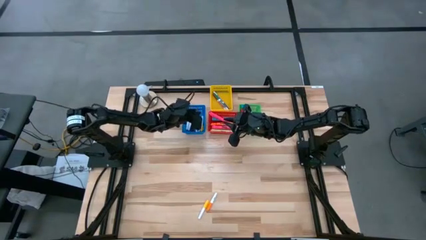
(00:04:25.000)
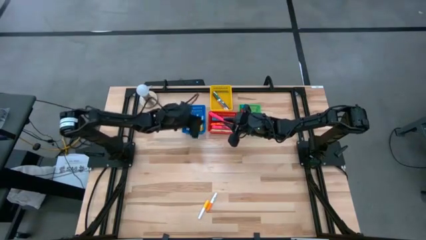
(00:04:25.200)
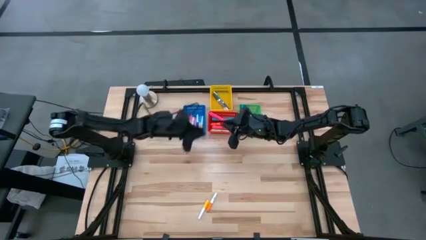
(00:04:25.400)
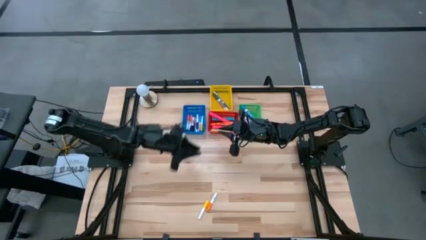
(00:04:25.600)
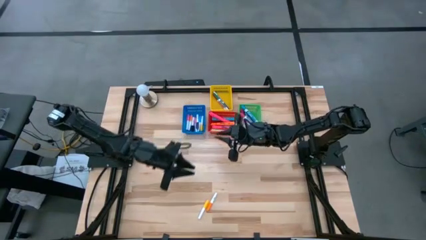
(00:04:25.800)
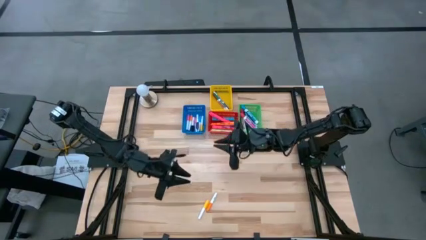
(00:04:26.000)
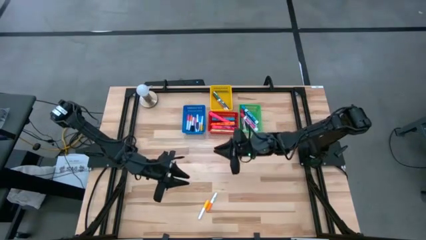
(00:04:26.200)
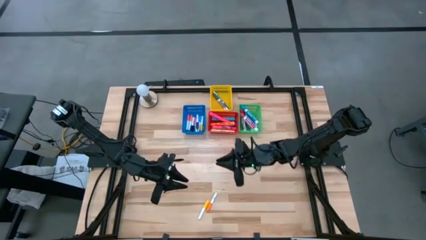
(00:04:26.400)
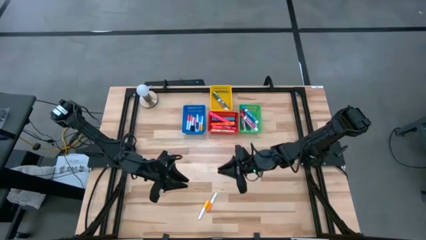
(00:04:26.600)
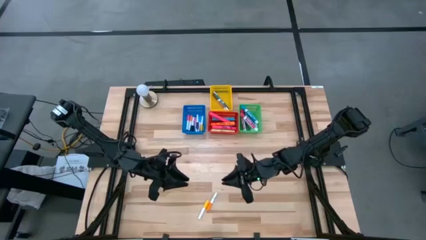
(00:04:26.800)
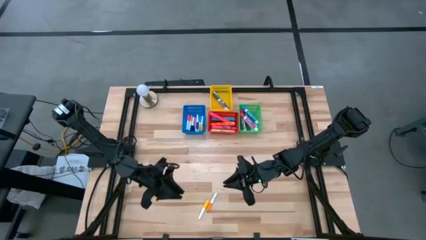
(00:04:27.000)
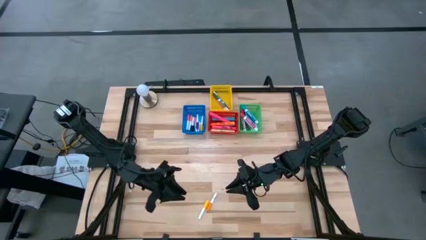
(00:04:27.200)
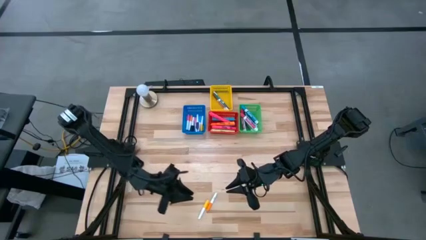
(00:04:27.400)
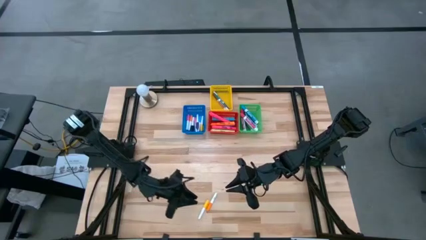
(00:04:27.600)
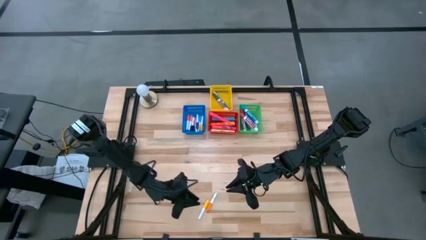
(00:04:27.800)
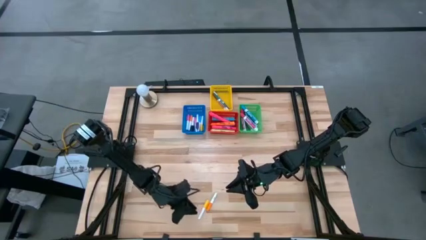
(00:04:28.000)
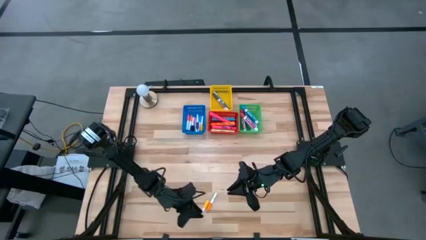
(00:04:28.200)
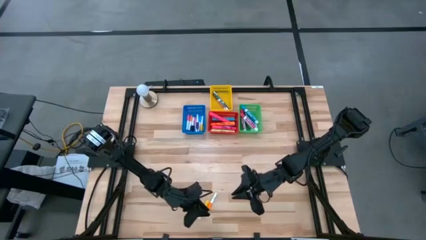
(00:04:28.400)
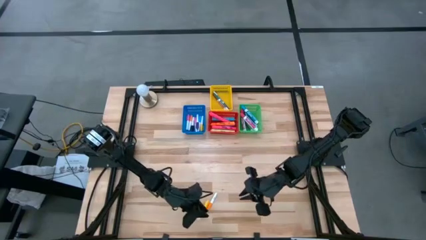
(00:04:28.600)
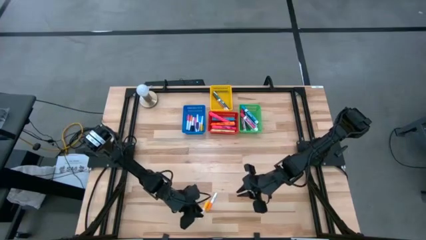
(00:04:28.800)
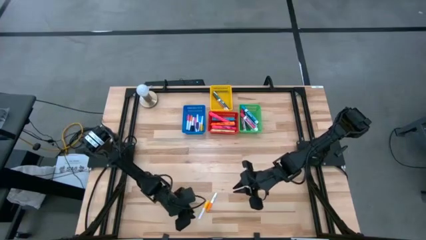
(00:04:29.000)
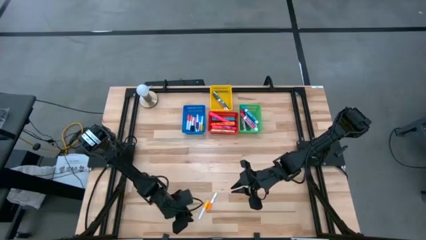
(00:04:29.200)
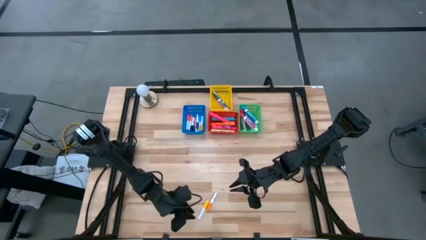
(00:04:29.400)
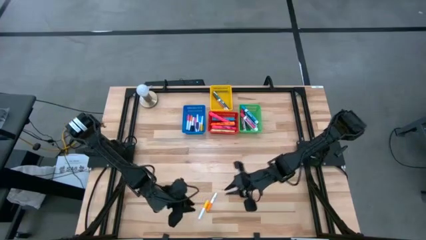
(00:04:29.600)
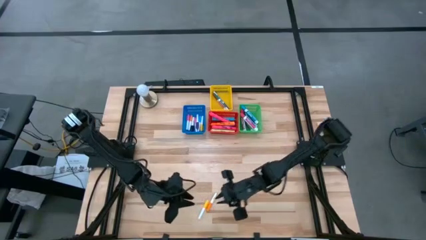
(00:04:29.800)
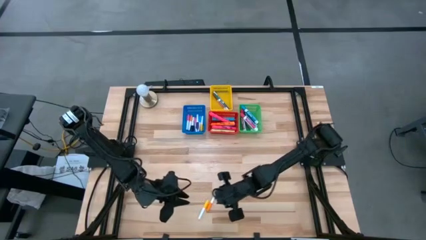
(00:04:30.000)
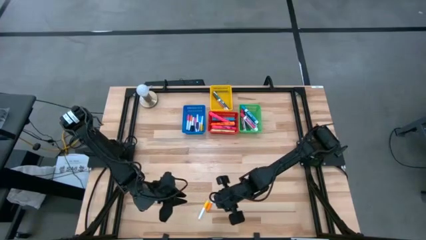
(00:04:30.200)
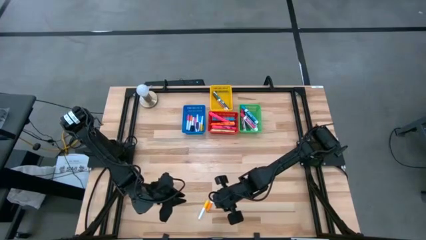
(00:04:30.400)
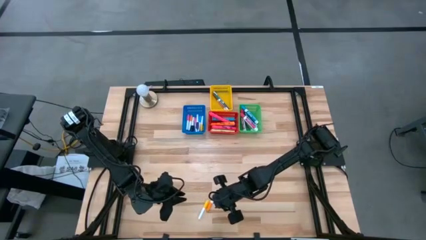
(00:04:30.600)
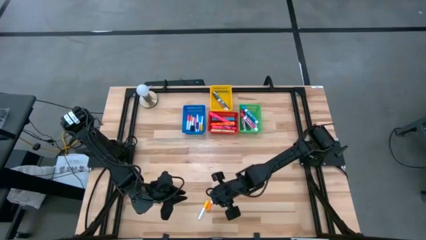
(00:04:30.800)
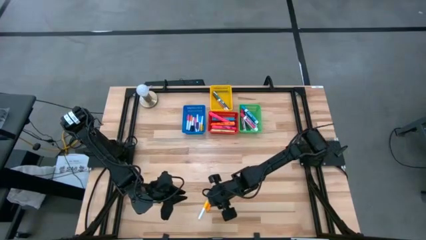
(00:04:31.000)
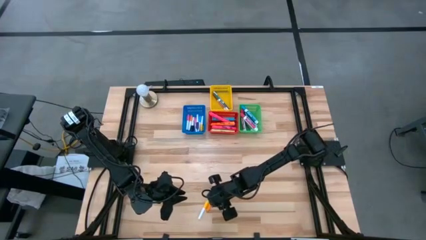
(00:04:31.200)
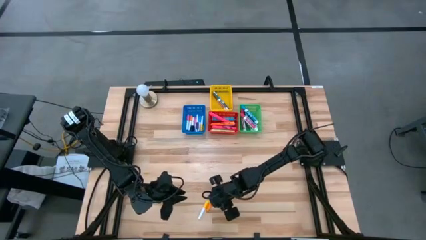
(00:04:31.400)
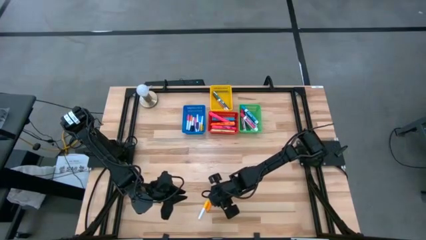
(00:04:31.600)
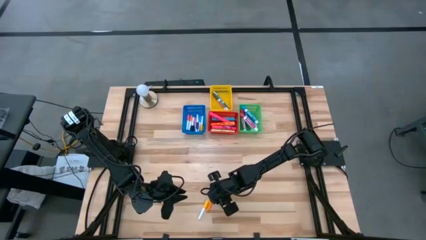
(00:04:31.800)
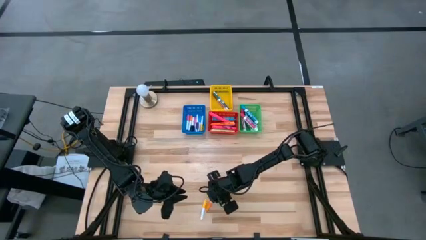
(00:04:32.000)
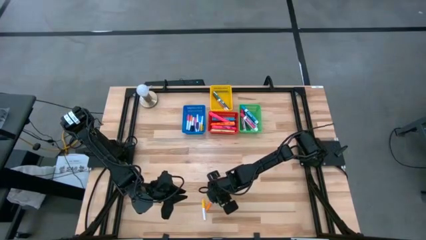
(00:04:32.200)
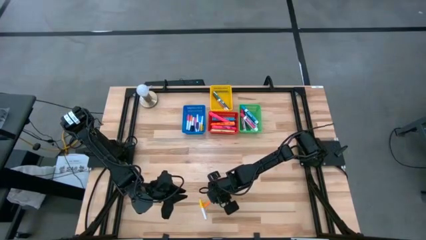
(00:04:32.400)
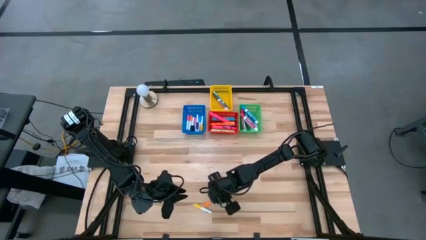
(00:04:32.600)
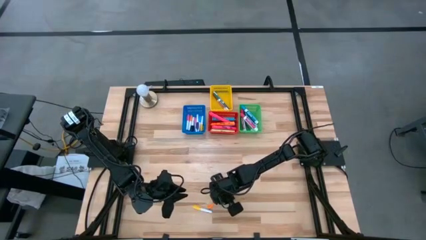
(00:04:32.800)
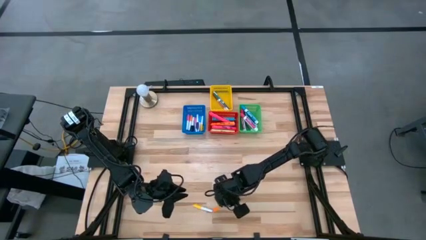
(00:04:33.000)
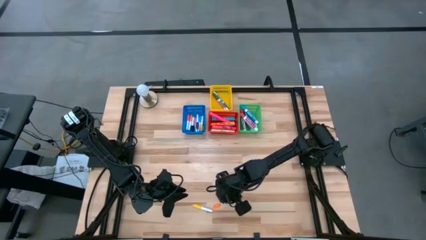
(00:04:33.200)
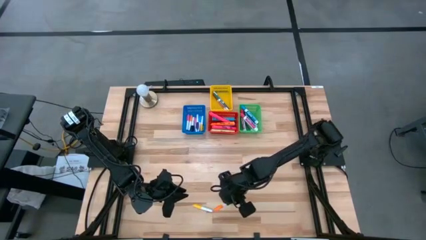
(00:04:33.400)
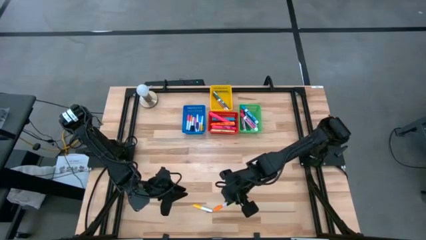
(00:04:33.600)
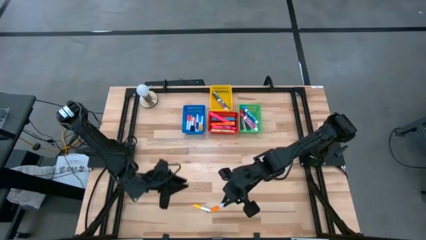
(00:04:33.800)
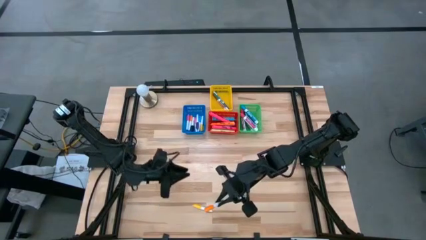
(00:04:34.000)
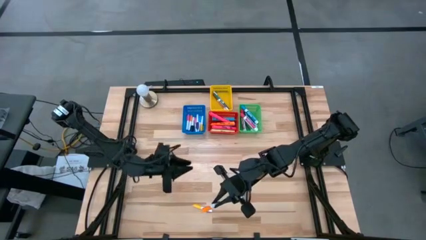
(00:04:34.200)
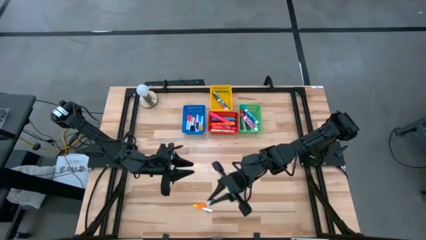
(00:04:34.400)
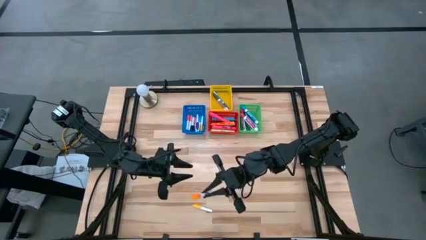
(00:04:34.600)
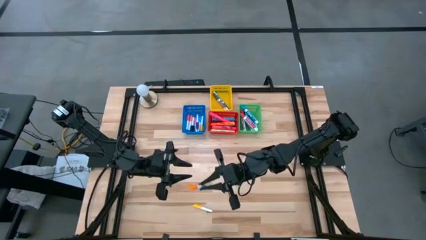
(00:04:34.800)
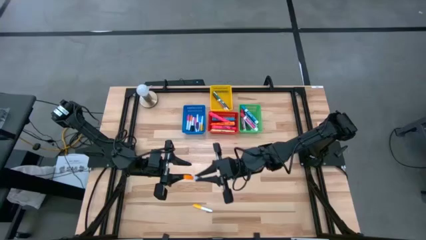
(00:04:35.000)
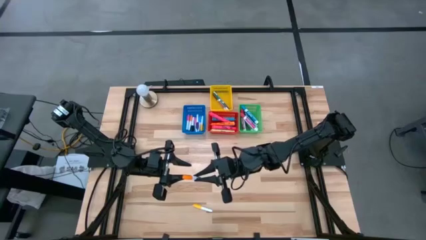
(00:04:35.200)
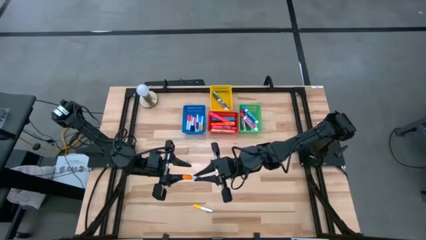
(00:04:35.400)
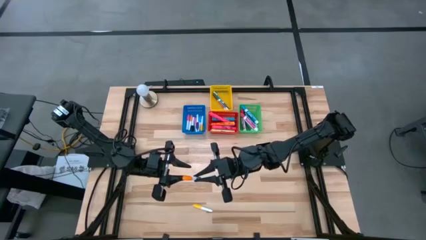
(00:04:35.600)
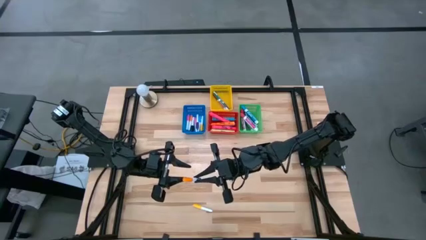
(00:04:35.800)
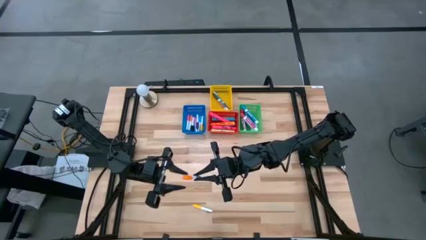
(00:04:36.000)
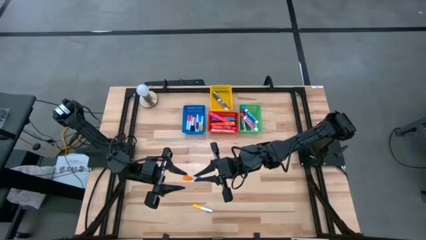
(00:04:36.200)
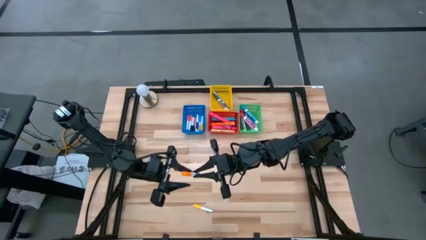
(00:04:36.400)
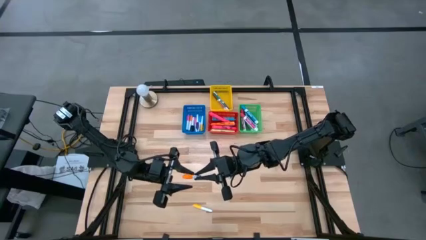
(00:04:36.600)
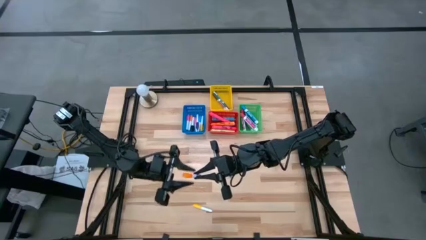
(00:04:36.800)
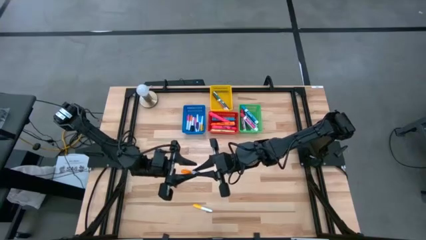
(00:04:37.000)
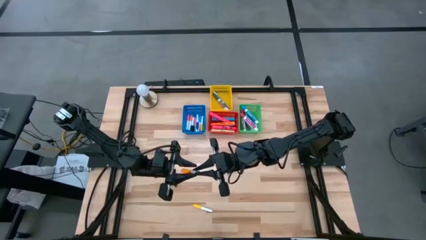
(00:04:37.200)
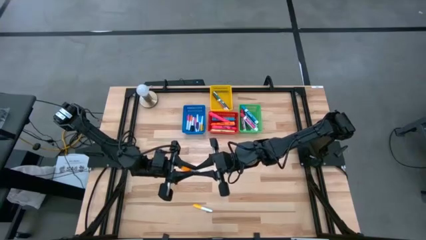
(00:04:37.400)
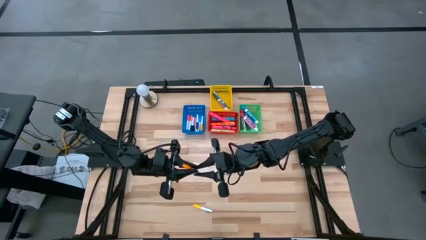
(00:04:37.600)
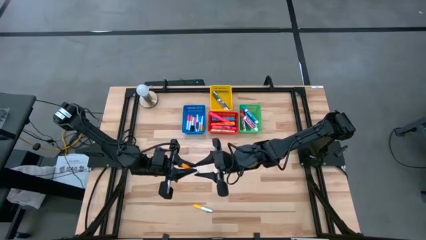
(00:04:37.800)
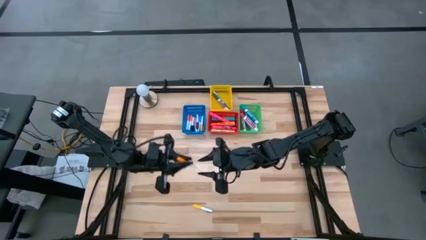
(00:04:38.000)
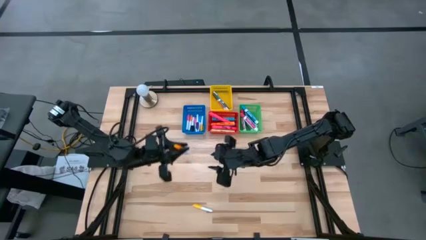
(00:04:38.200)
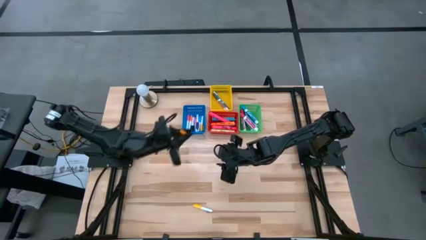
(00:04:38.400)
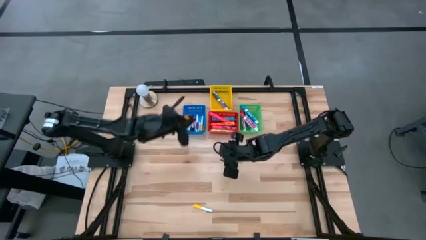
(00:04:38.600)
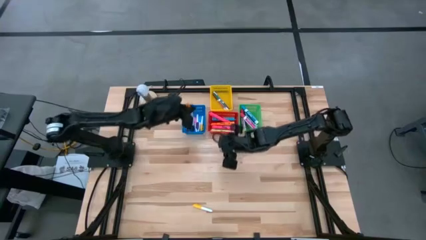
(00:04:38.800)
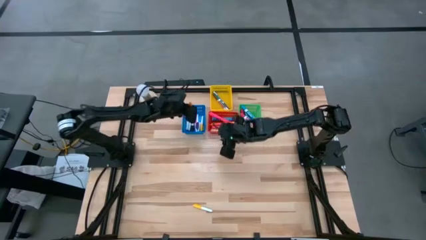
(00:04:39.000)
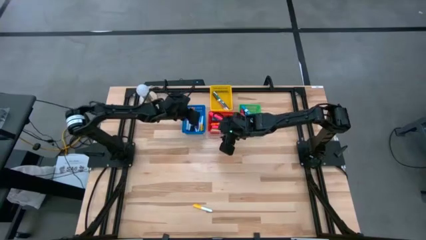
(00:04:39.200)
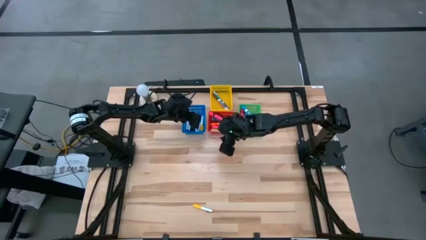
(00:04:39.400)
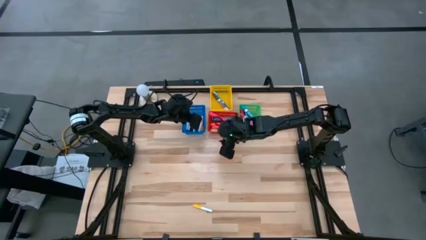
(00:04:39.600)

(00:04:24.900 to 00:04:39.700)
Task: Pick & Place Markers
Put the small orange highlighter pen into the blue bin
